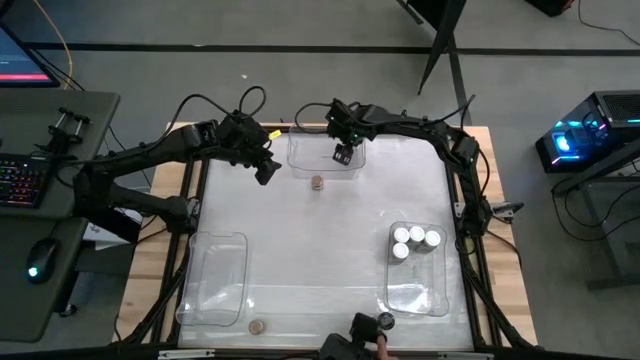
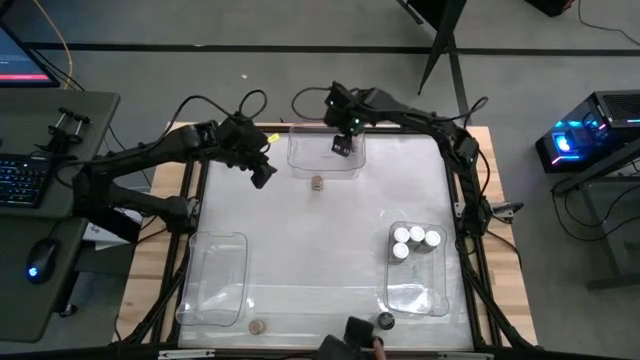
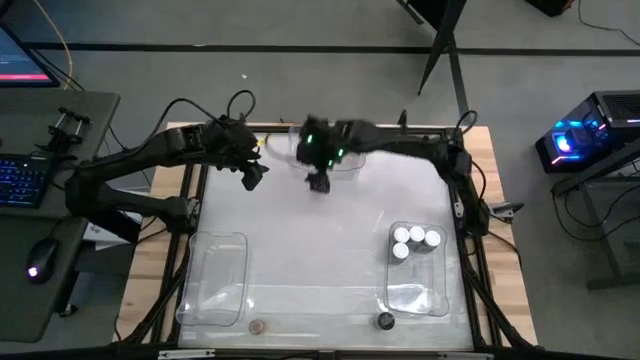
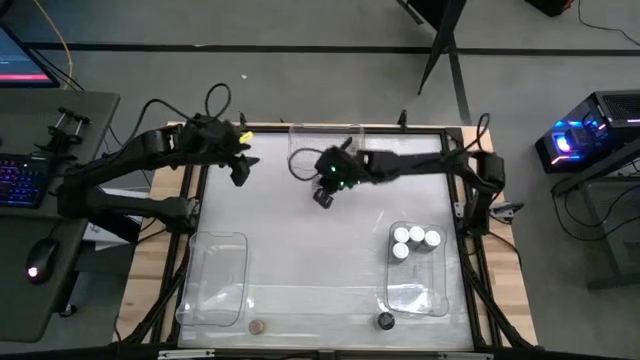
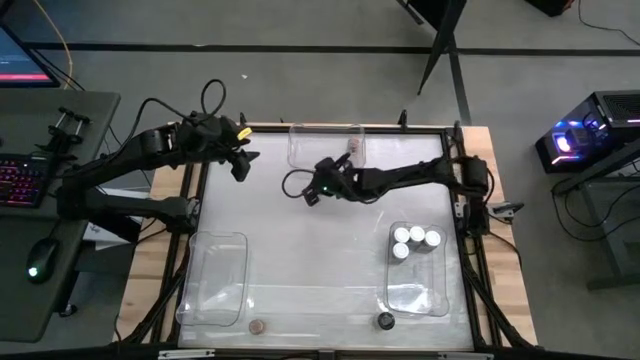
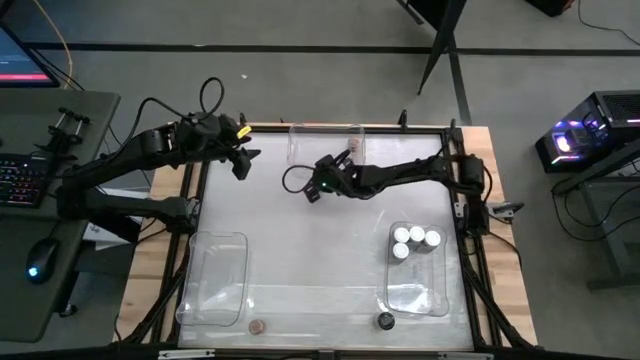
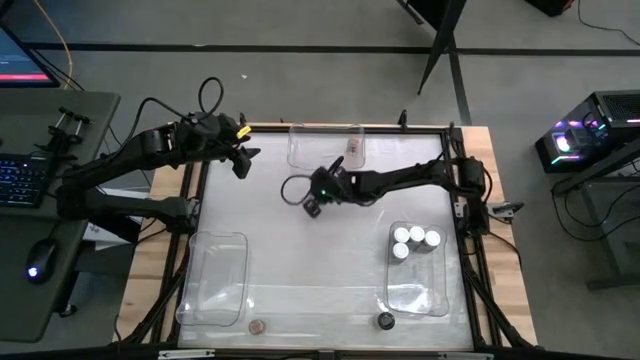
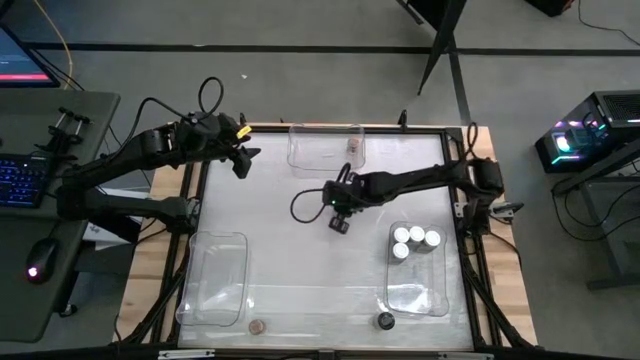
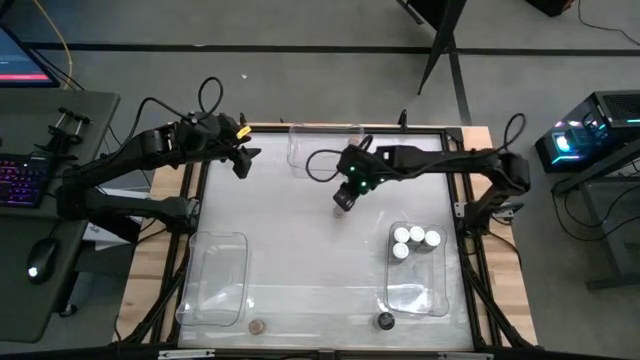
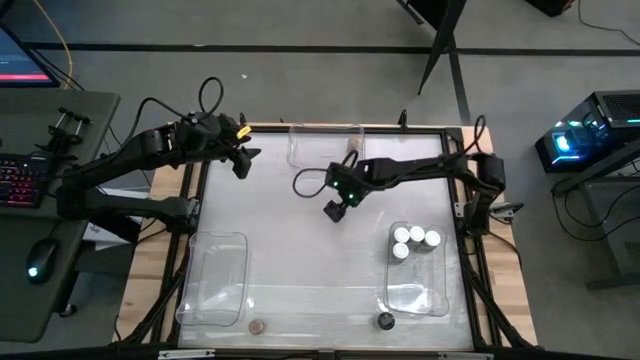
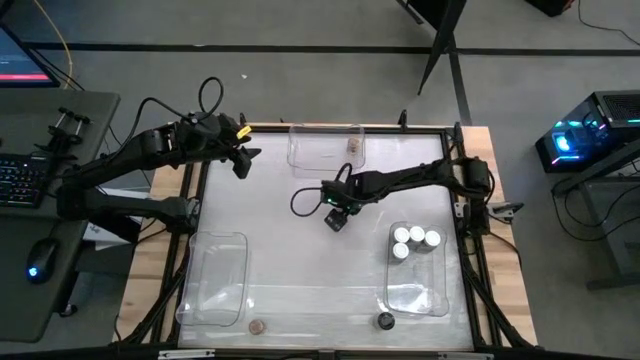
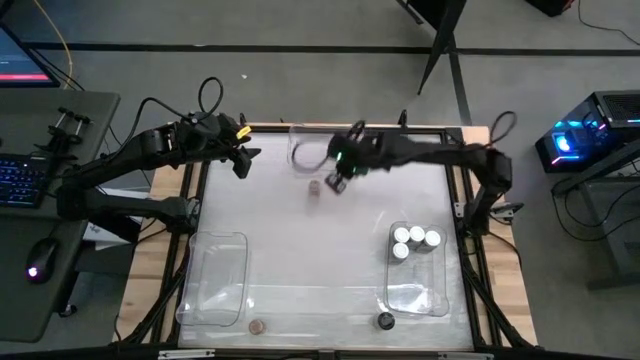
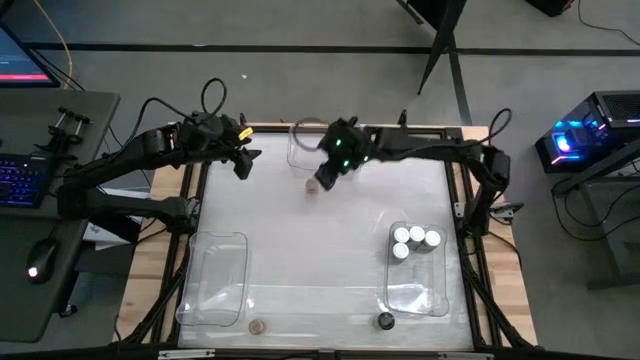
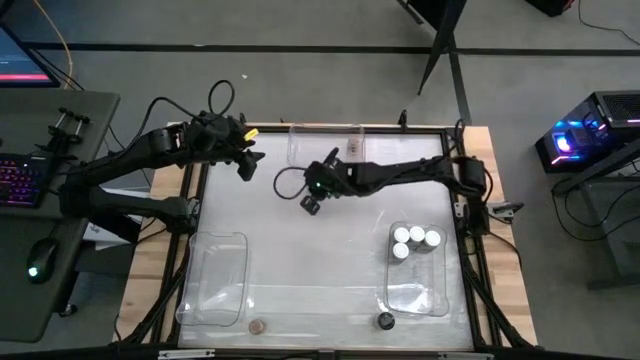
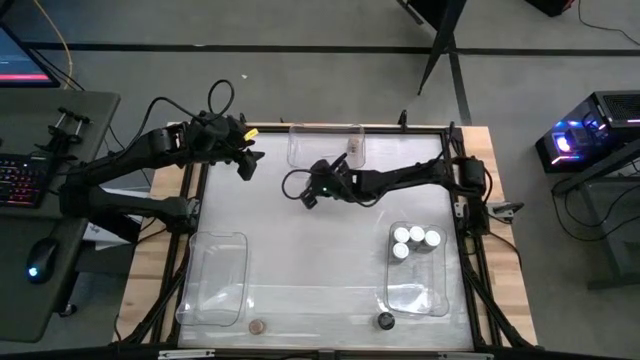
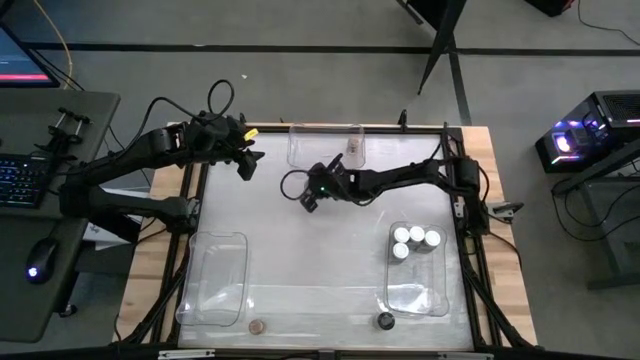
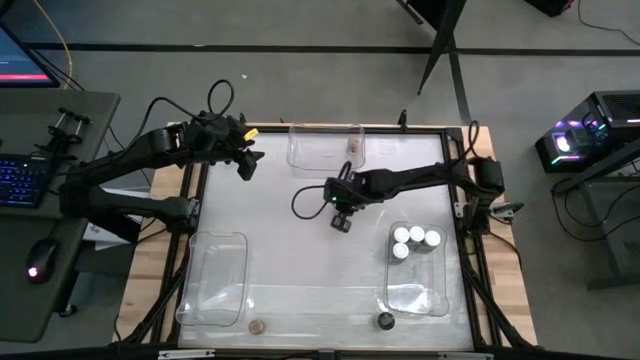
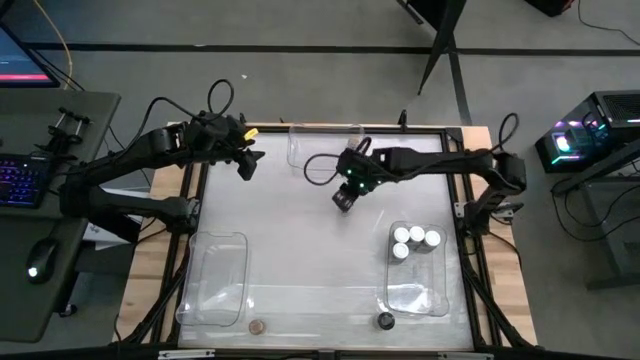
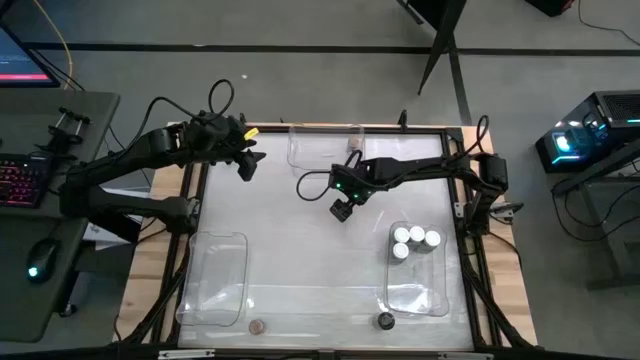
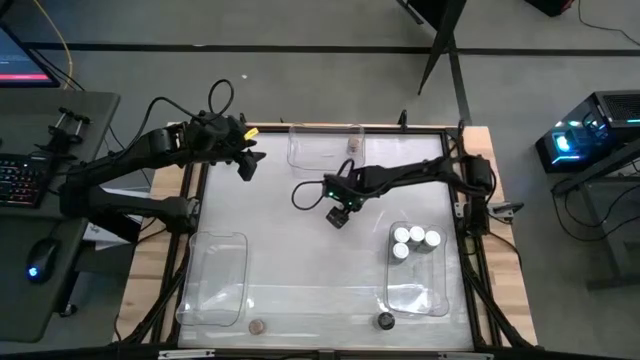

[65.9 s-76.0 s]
Task: Sort spices by type
Put the brown seasoning bottle into the top transparent bin

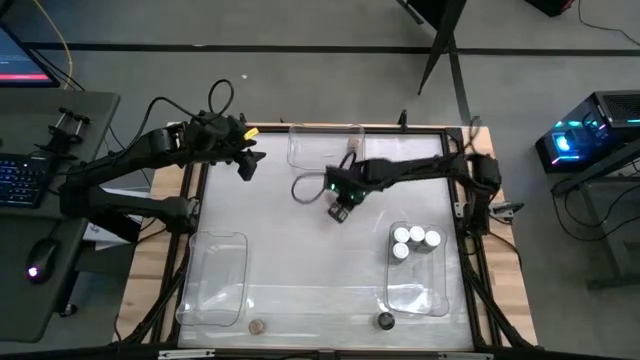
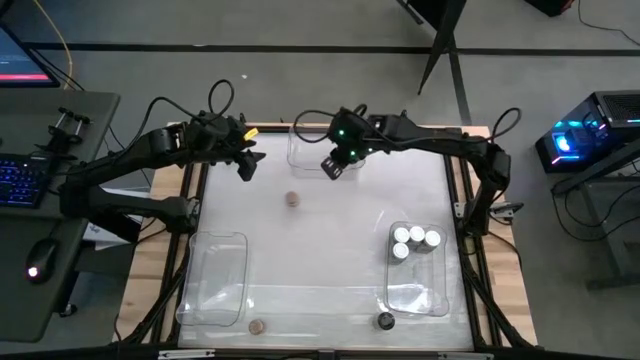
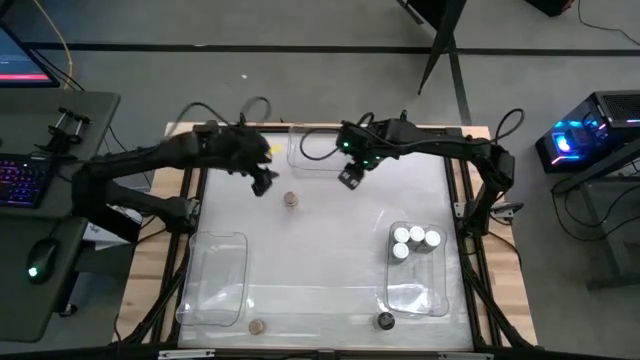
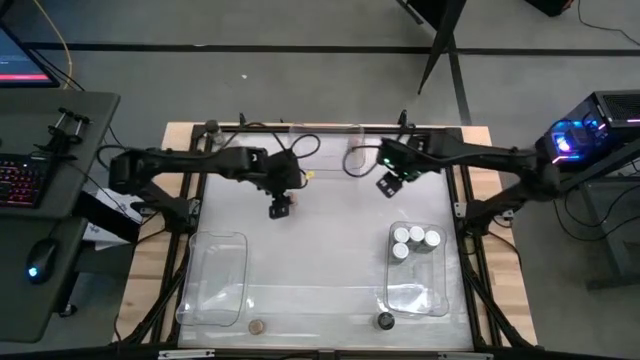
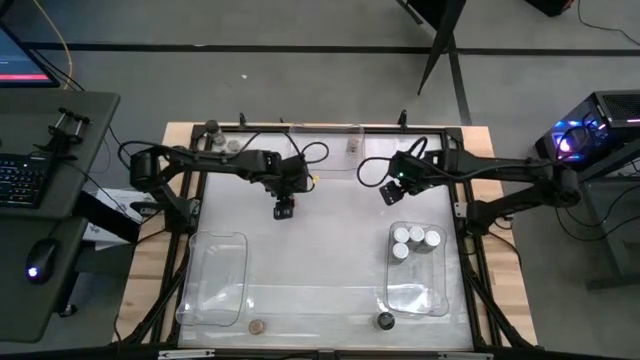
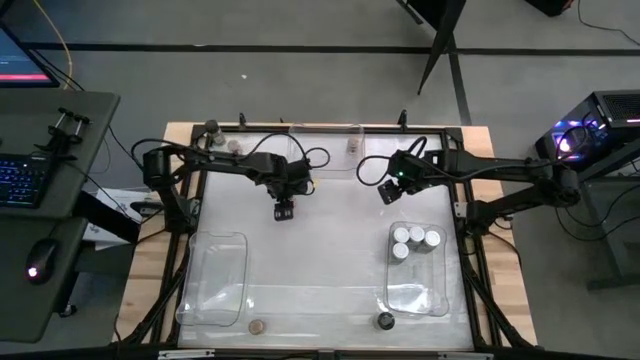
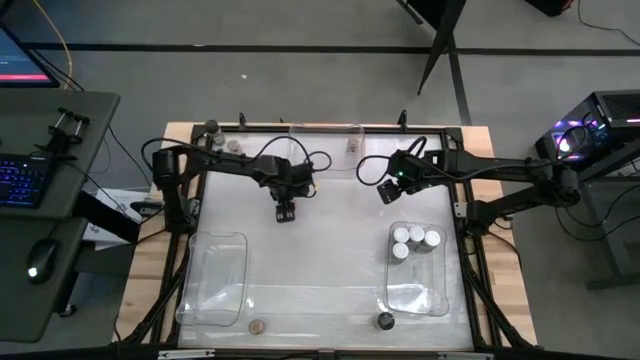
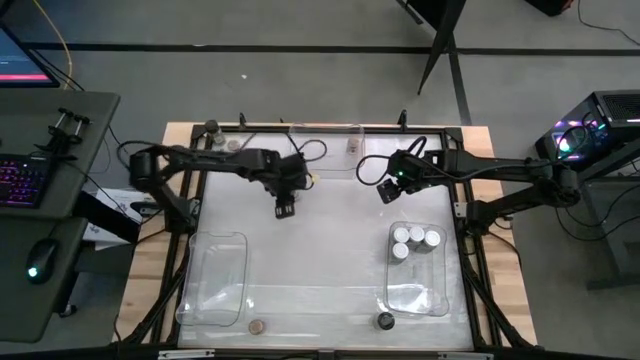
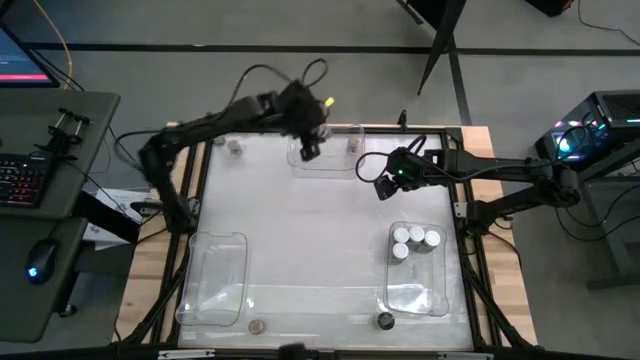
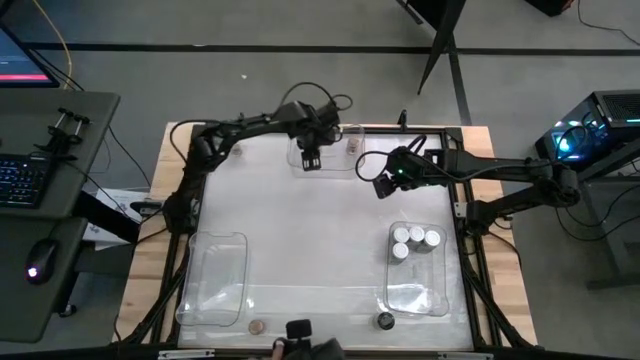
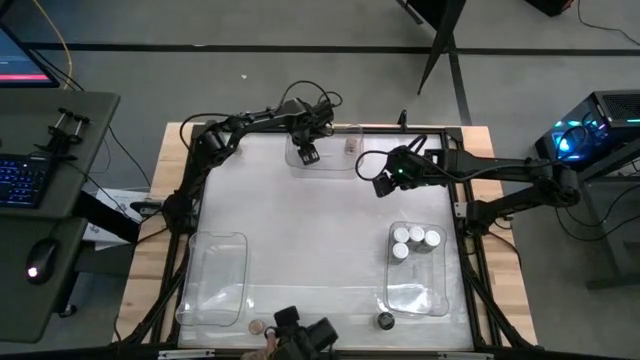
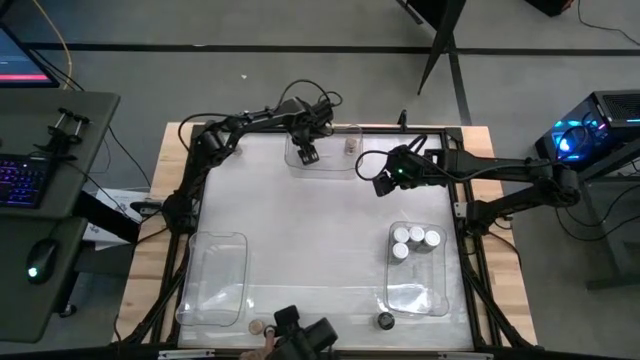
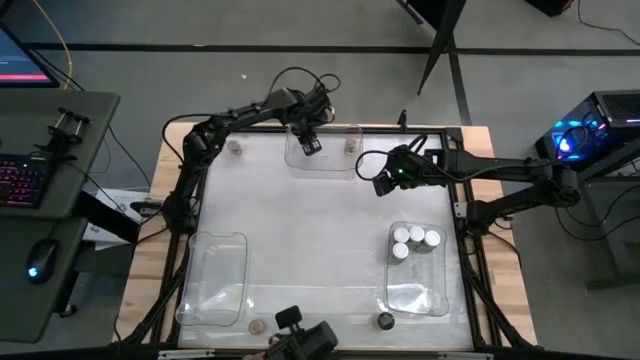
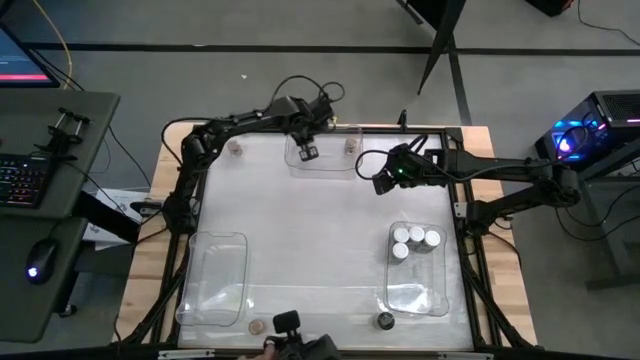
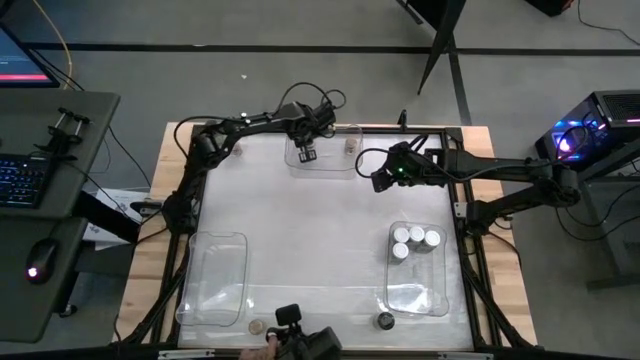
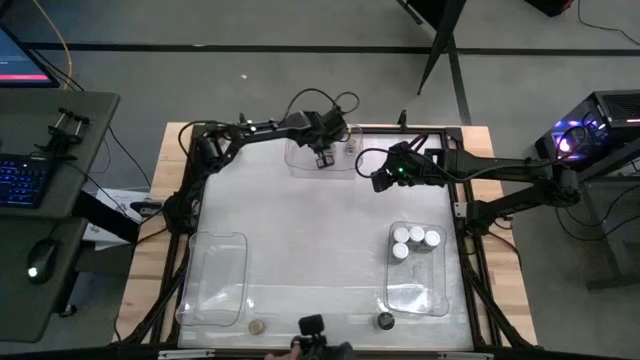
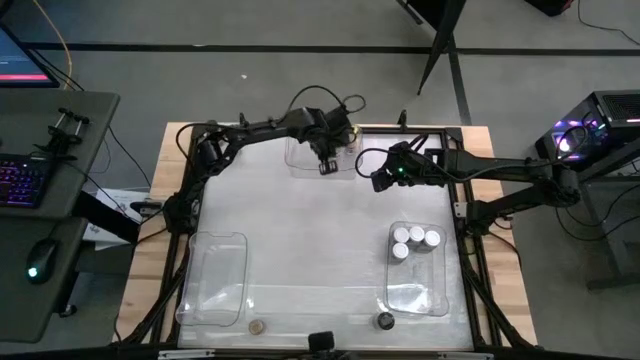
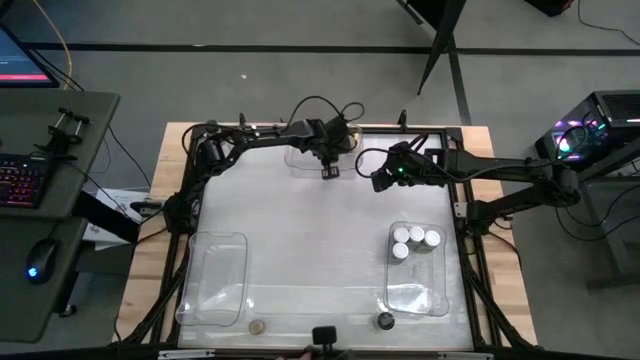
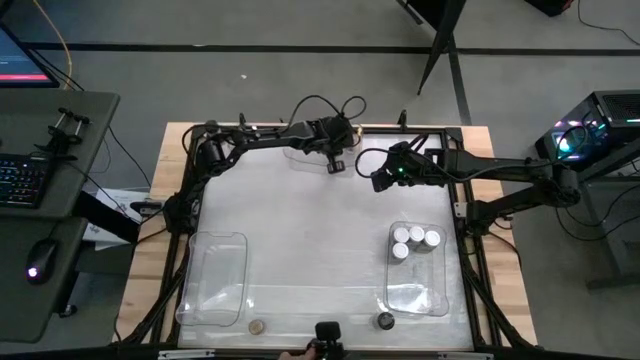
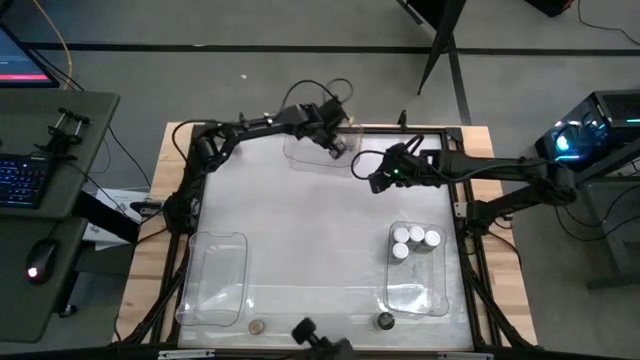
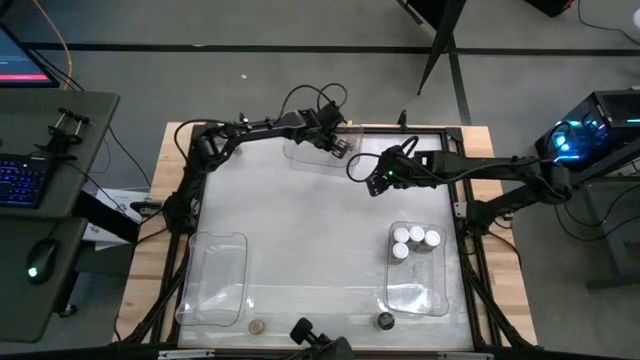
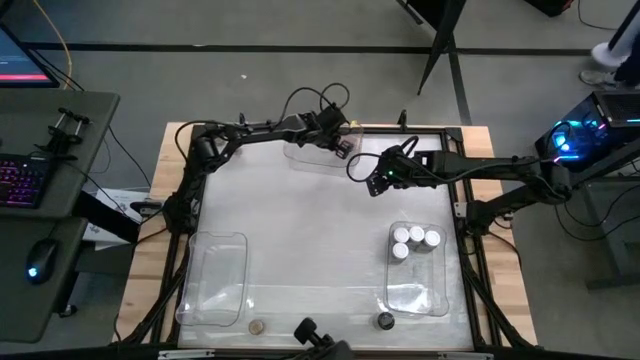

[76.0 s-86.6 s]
Put the brown seasoning bottle into the top transparent bin

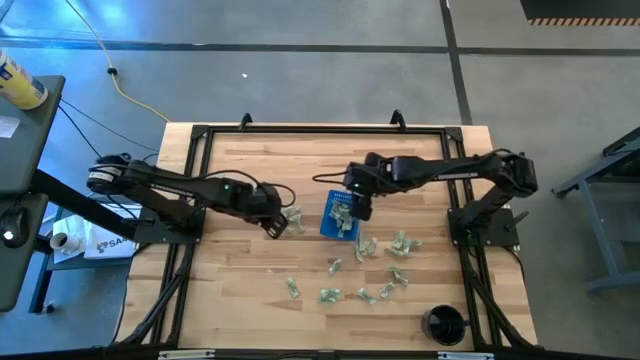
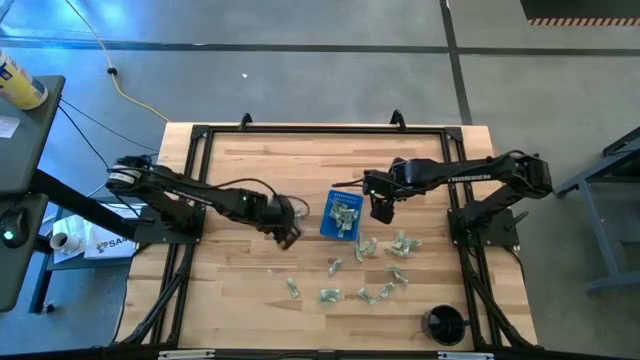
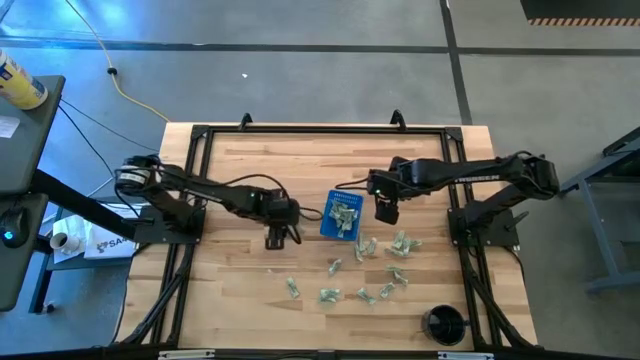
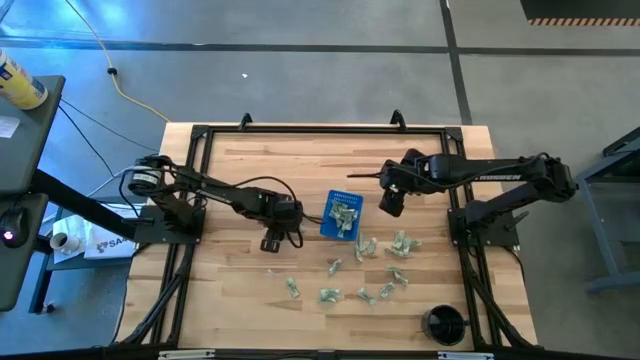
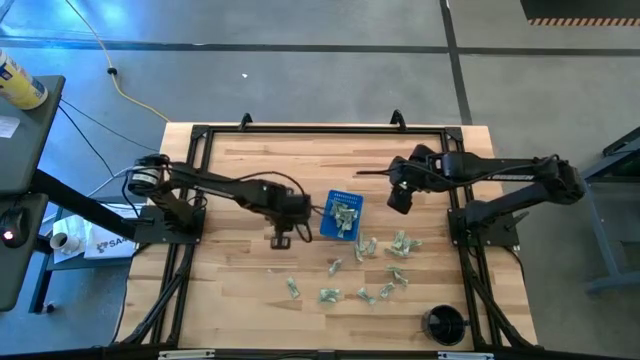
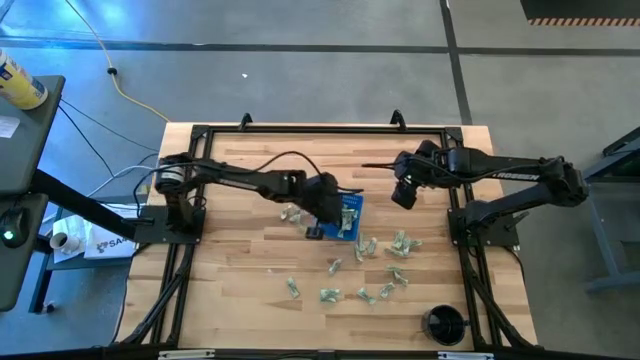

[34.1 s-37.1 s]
Task: Pick and place Stevia / Truvia into bins
Put the stevia packet into the blue basket
